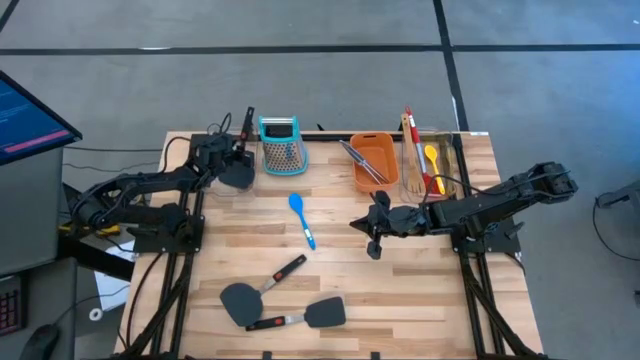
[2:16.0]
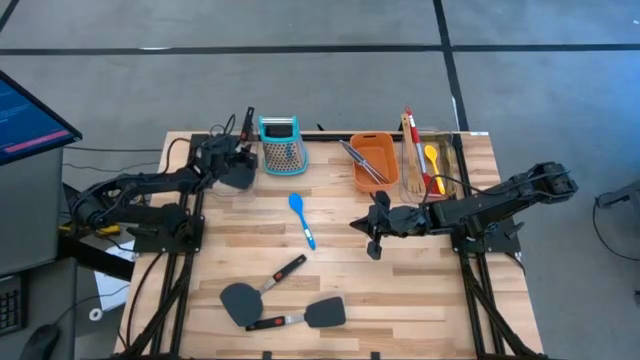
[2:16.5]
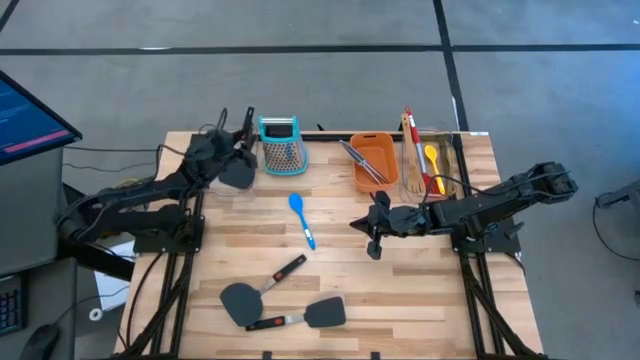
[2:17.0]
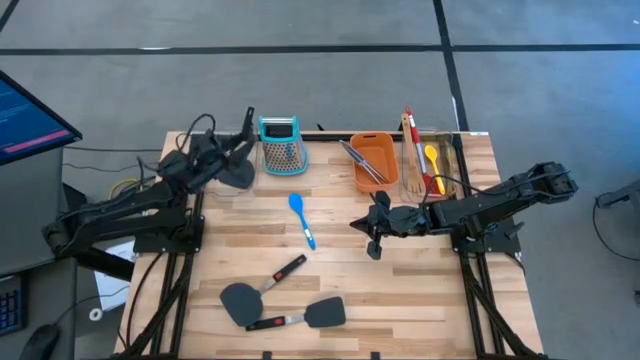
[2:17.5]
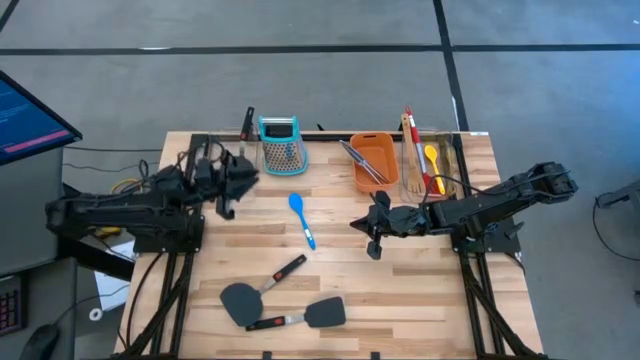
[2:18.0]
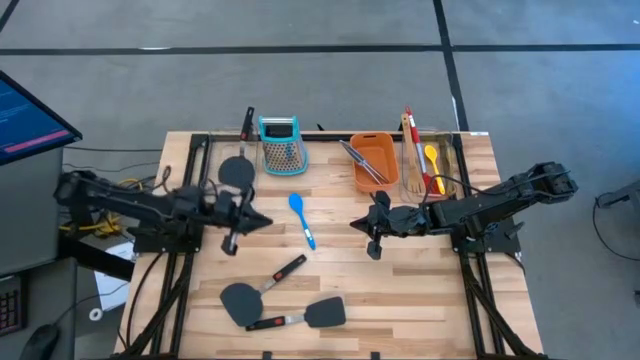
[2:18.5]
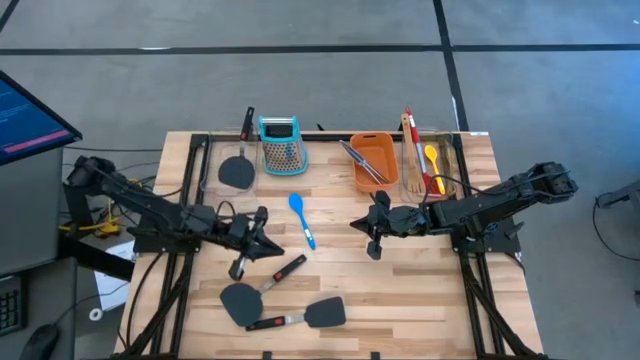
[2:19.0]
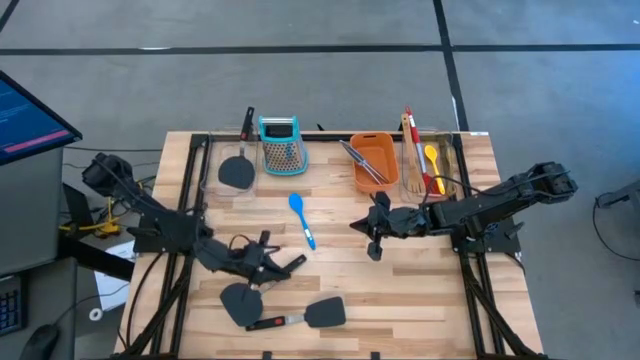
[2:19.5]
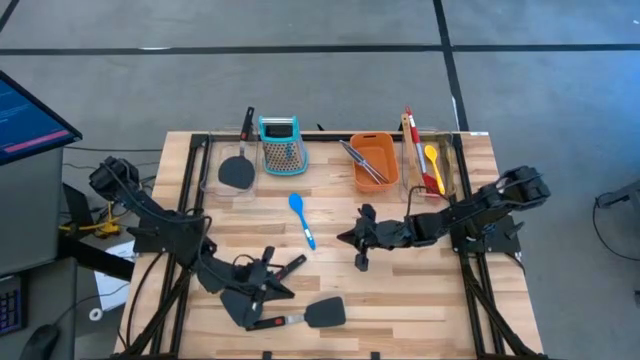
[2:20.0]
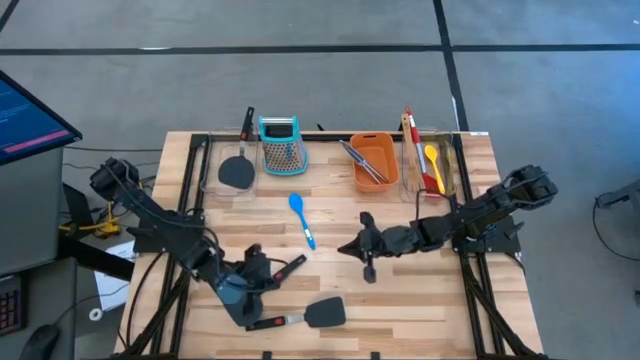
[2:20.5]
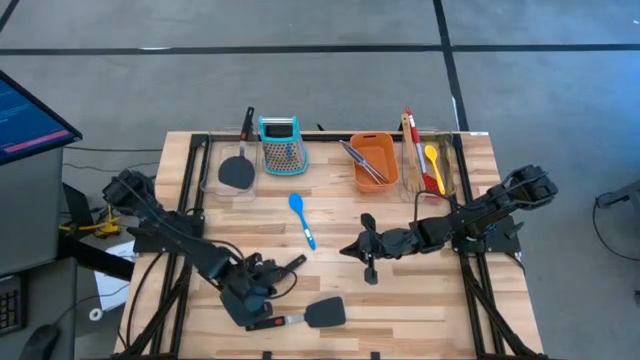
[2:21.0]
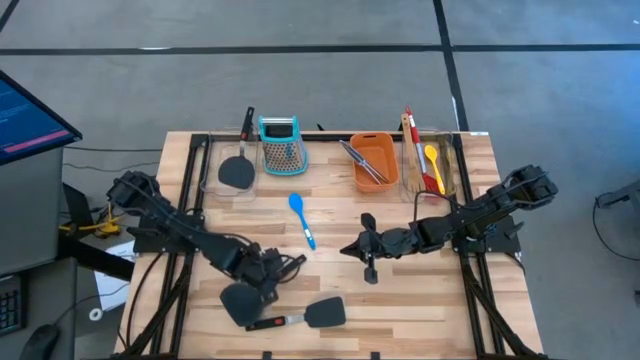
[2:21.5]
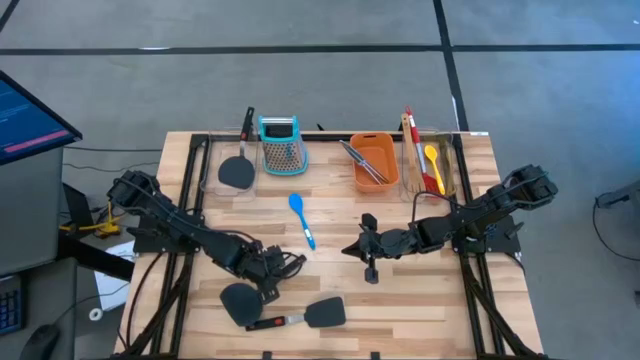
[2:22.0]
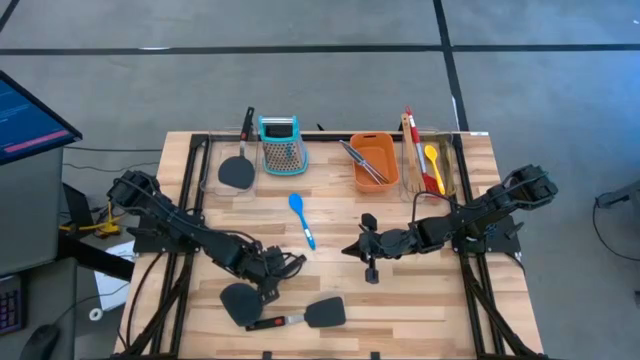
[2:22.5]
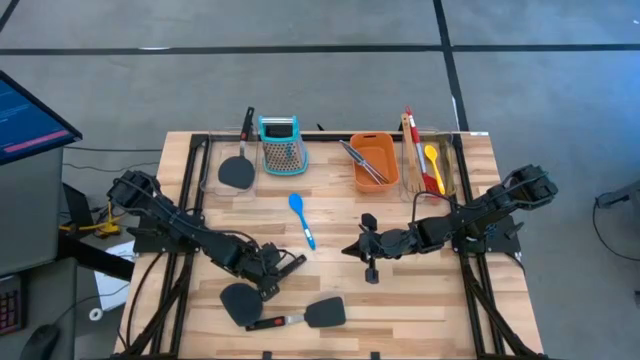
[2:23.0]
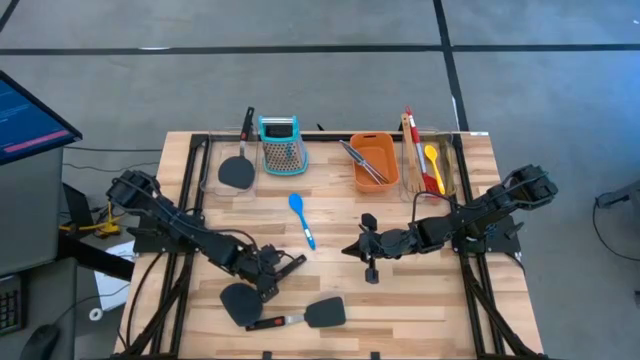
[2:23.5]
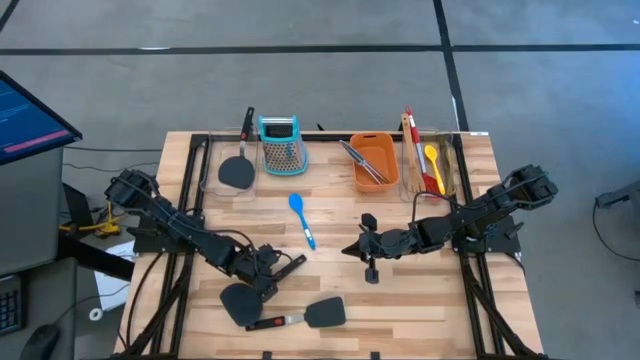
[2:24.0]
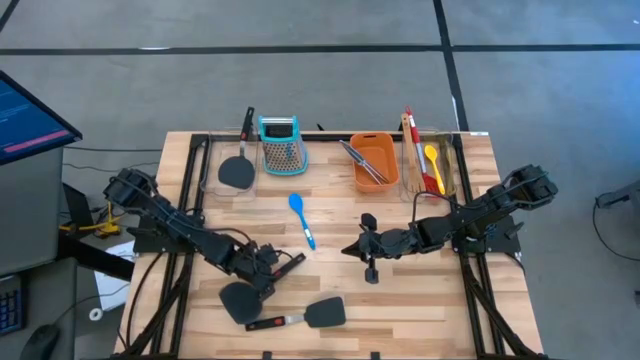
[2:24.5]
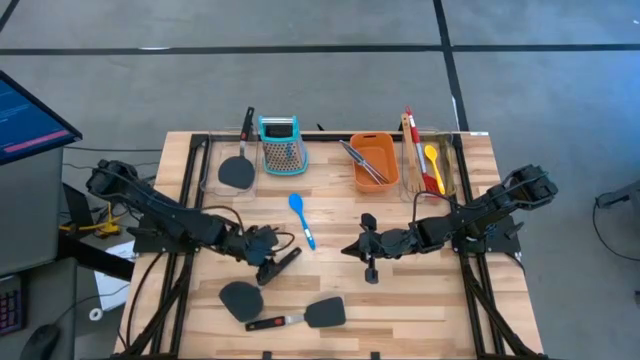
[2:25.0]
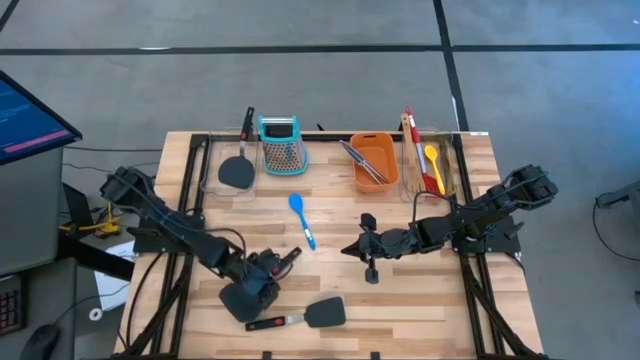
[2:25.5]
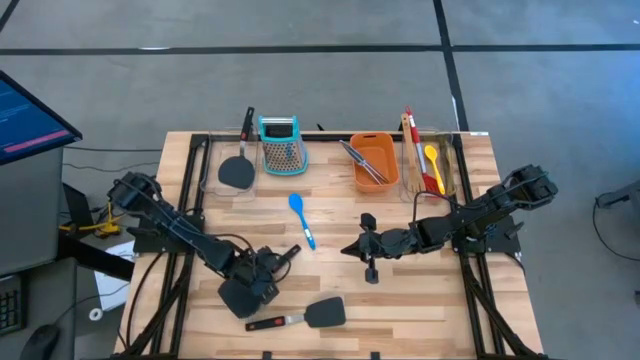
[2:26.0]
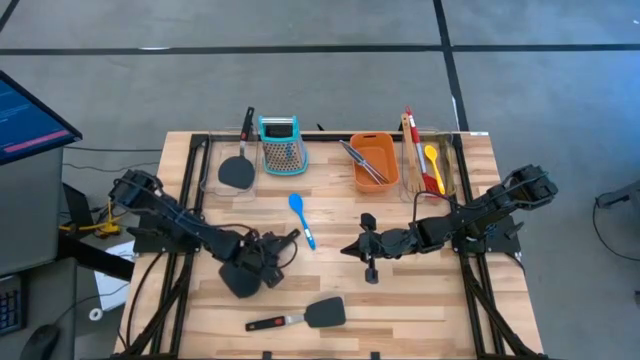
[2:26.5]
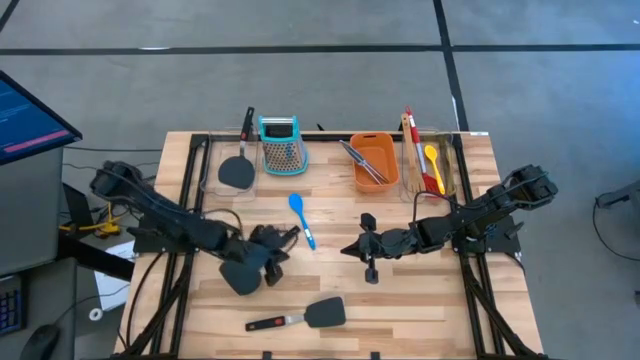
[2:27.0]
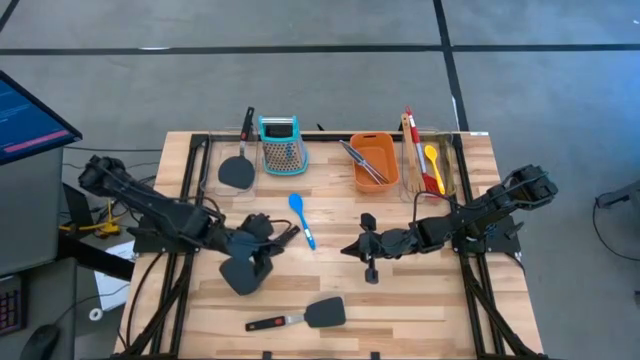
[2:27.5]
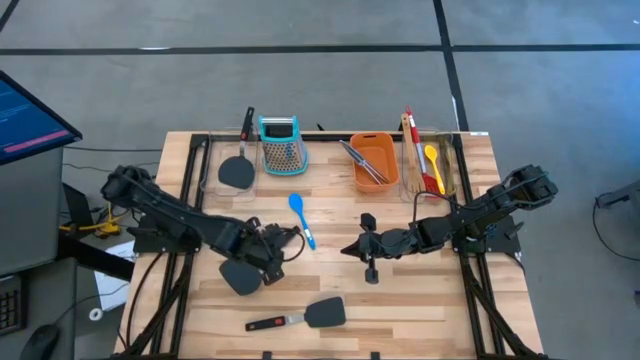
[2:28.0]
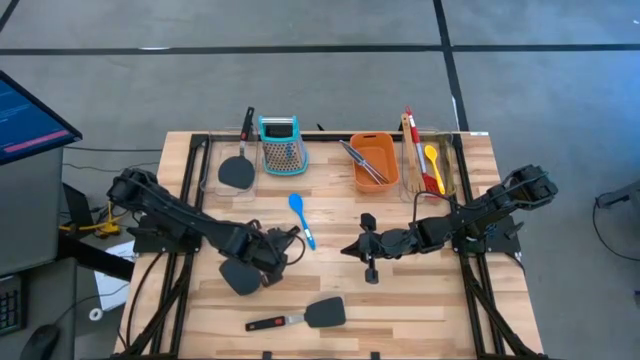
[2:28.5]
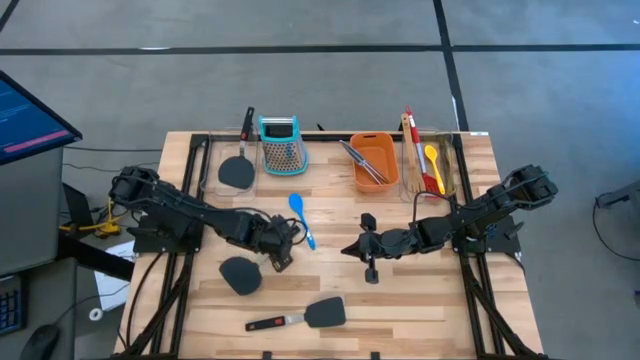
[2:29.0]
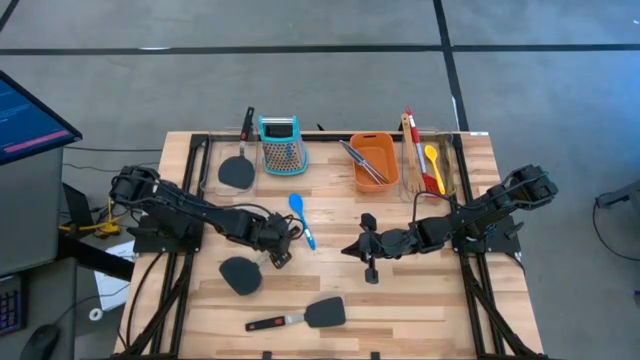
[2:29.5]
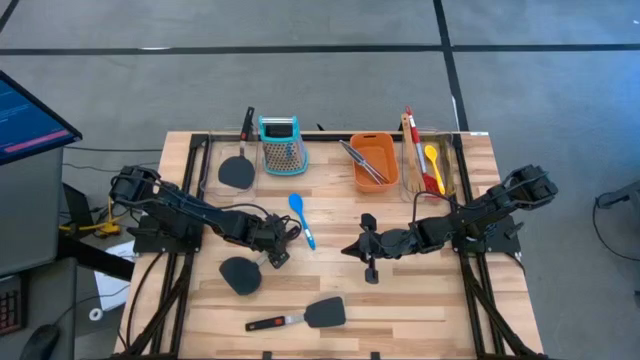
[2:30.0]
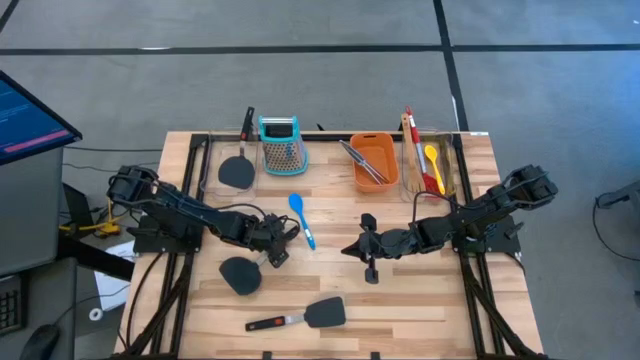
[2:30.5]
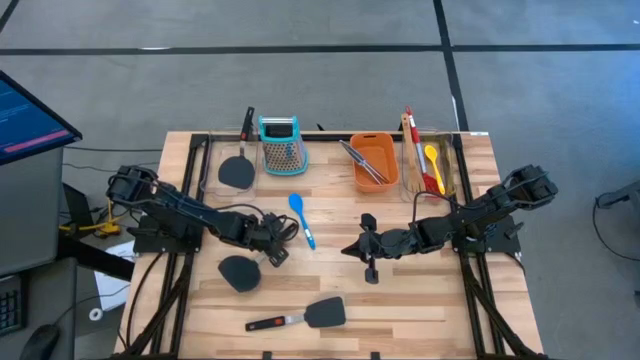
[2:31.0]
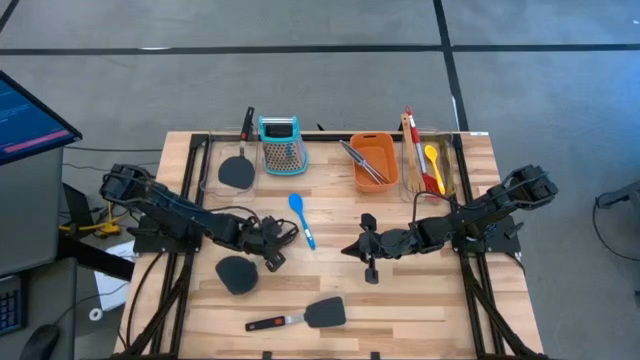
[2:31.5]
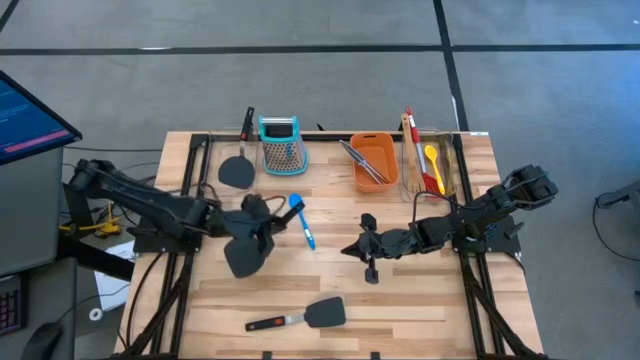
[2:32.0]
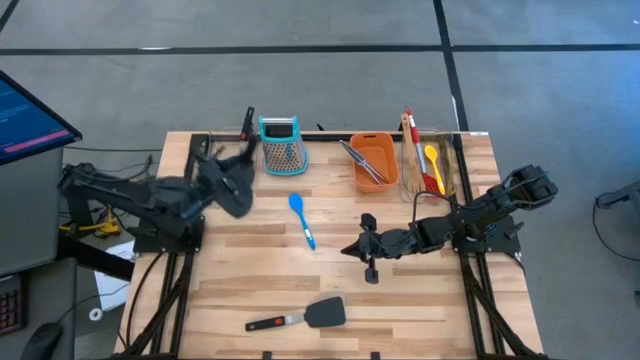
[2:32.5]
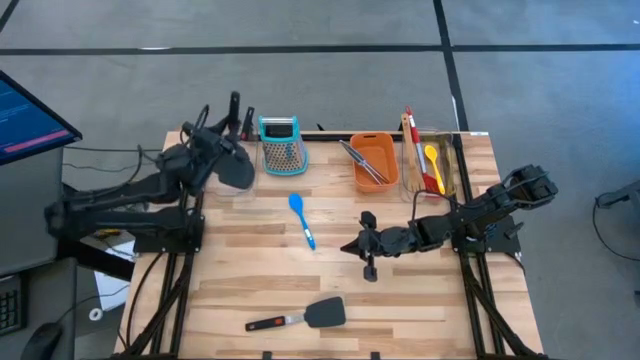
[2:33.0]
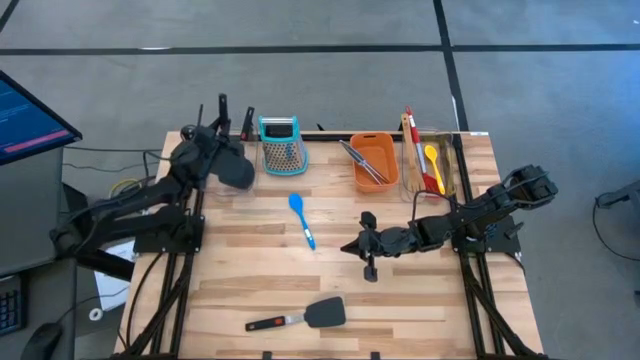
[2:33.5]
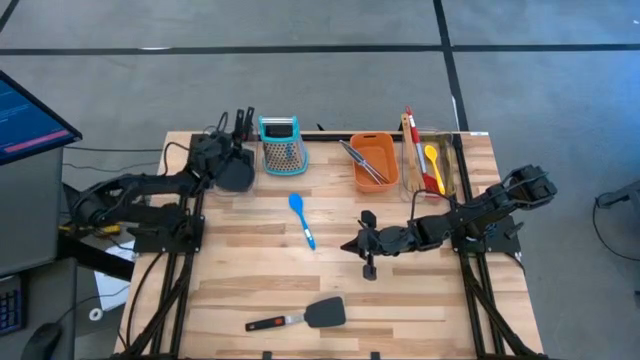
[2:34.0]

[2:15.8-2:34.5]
Task: Pick & Place Kitchen Items
Put the top black spatula into the left transparent bin

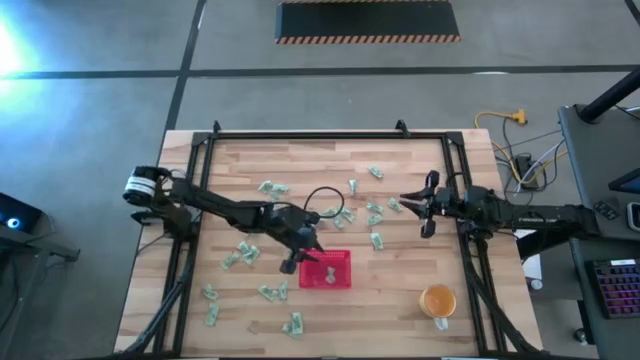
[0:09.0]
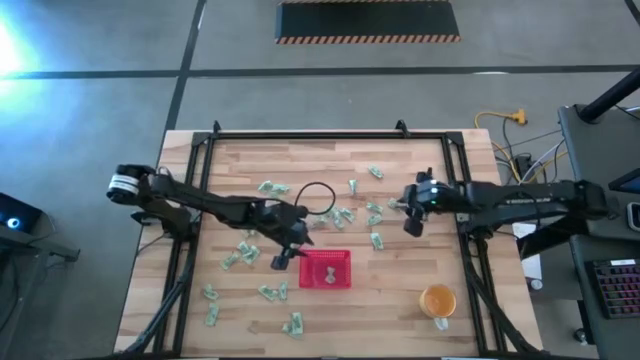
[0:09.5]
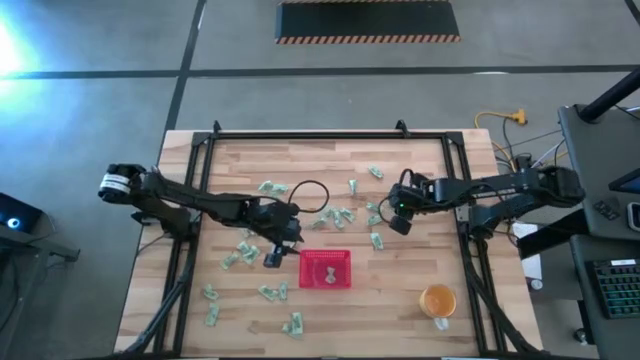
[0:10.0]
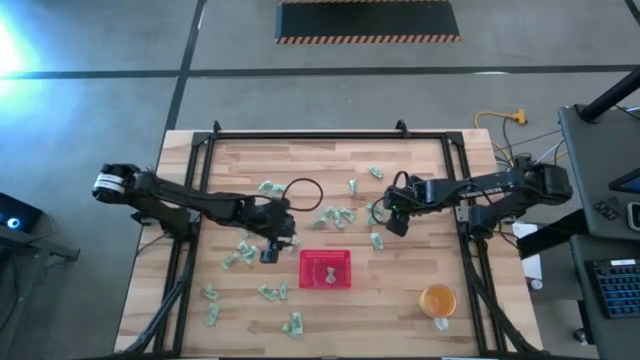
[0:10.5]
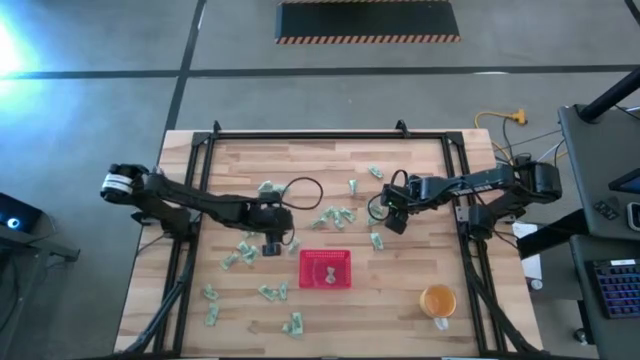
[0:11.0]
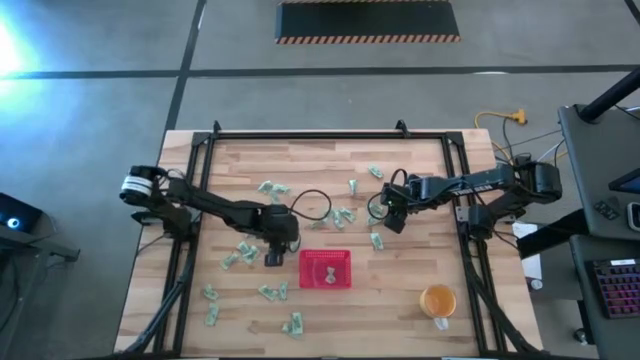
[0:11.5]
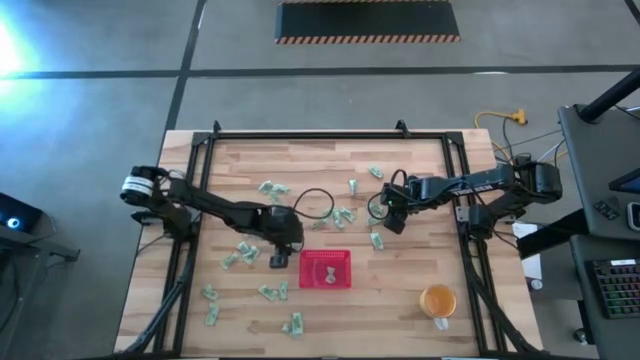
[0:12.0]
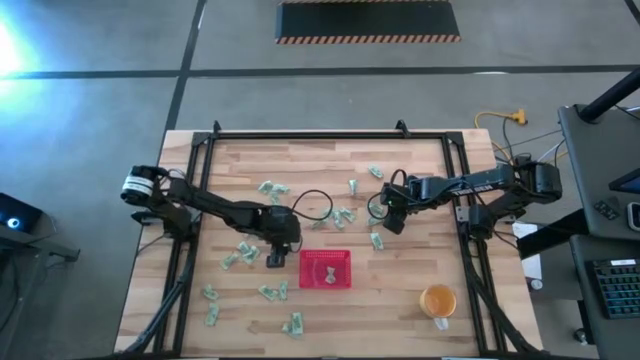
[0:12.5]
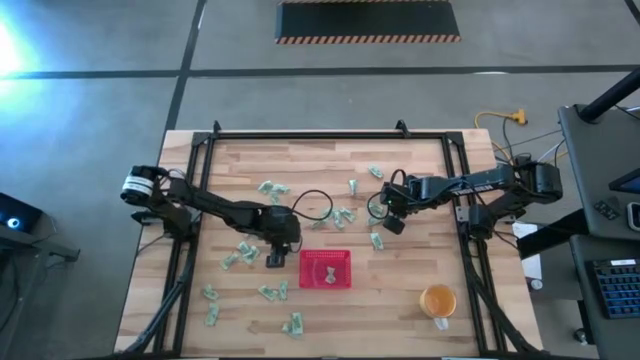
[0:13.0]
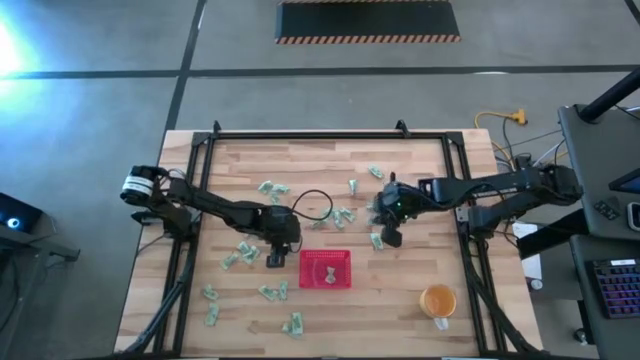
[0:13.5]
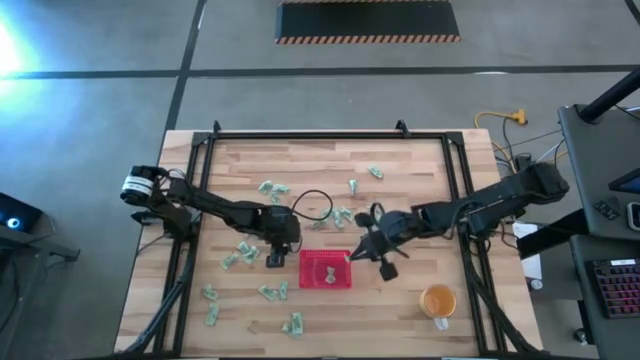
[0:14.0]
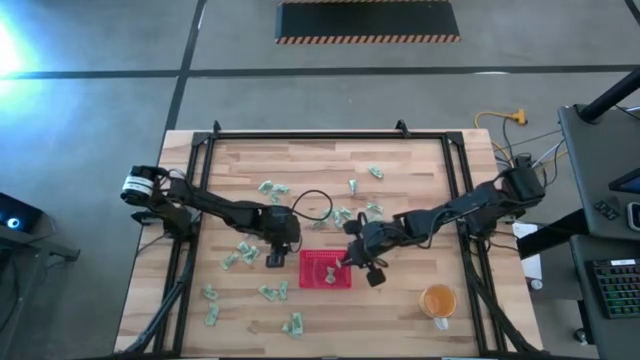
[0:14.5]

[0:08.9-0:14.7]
Task: Pick and place Stevia / Truvia into bins
Put the white stevia packet into the red bin
